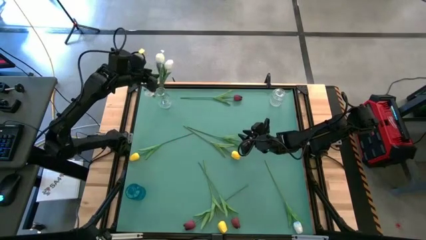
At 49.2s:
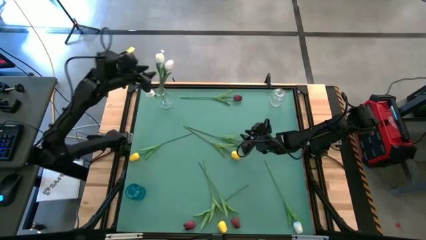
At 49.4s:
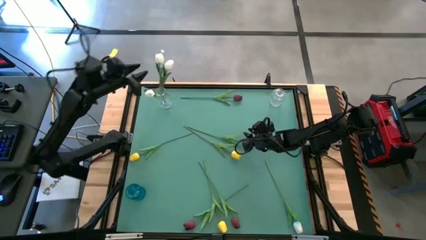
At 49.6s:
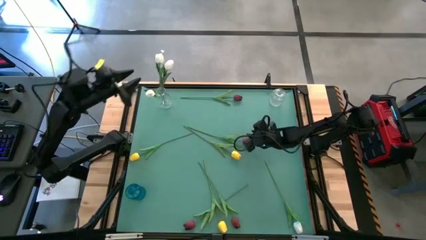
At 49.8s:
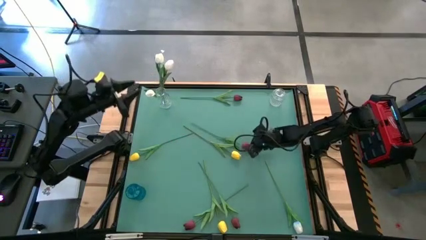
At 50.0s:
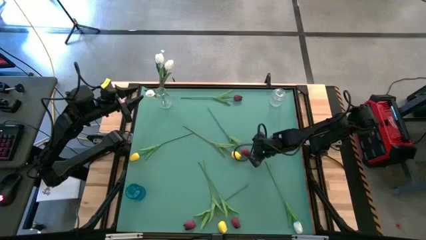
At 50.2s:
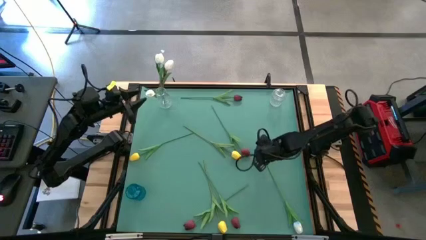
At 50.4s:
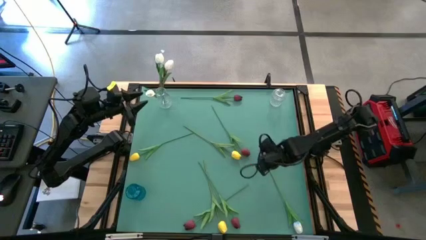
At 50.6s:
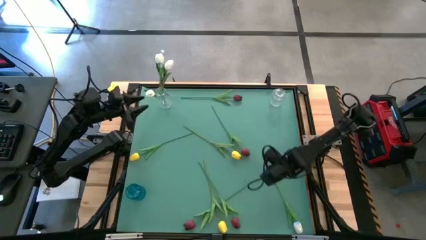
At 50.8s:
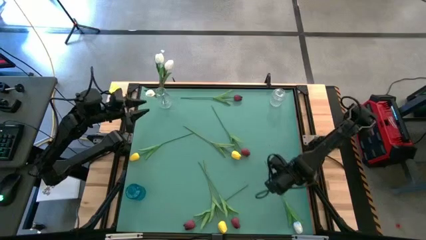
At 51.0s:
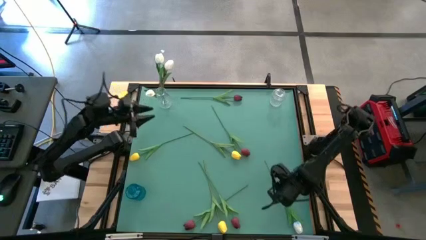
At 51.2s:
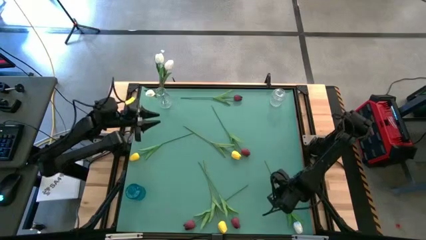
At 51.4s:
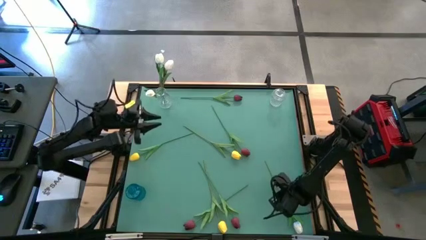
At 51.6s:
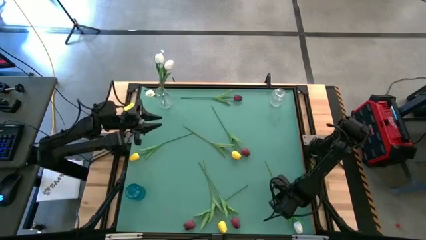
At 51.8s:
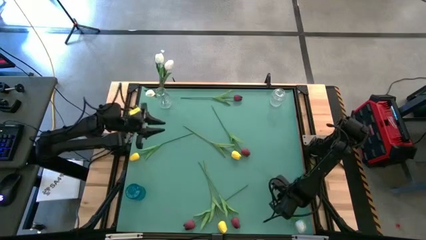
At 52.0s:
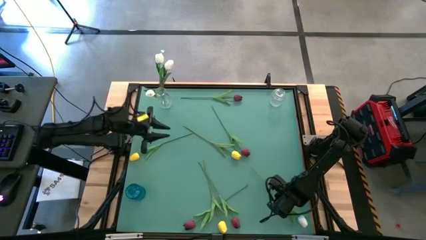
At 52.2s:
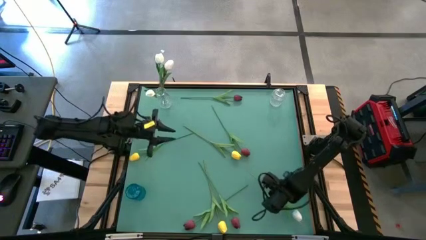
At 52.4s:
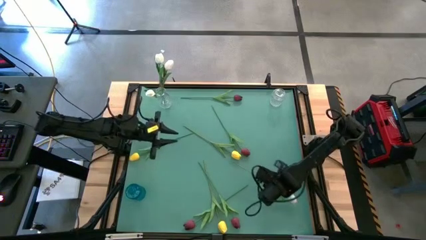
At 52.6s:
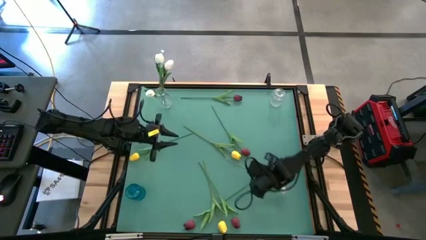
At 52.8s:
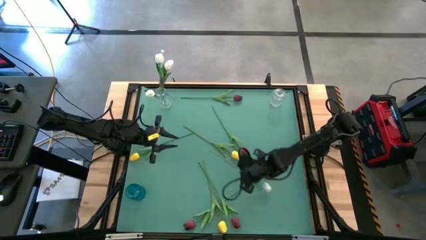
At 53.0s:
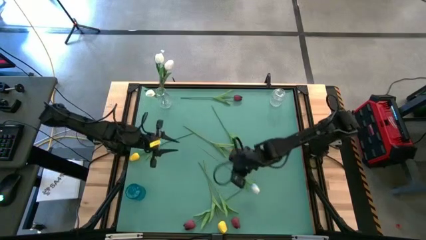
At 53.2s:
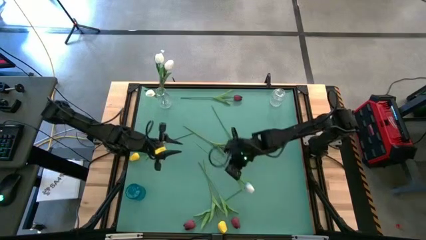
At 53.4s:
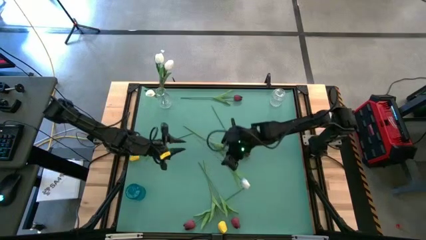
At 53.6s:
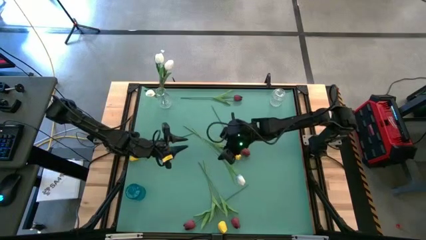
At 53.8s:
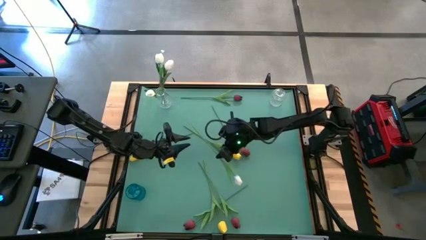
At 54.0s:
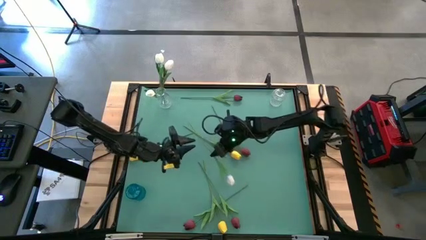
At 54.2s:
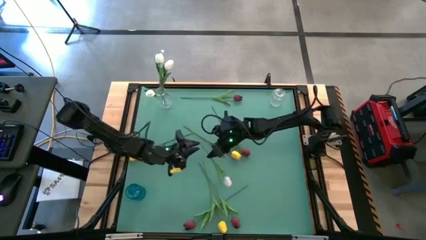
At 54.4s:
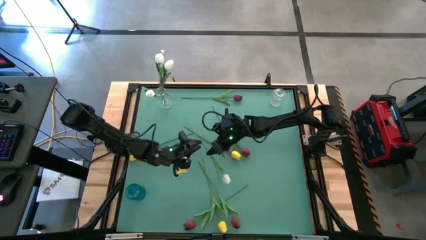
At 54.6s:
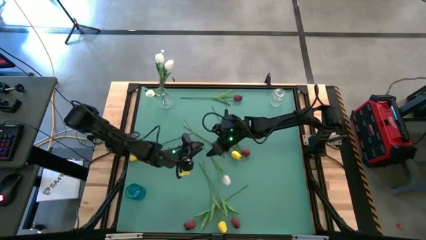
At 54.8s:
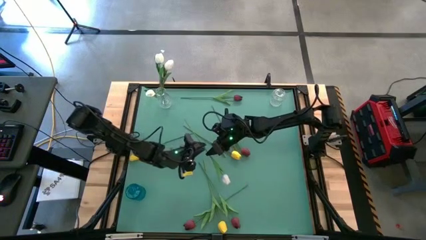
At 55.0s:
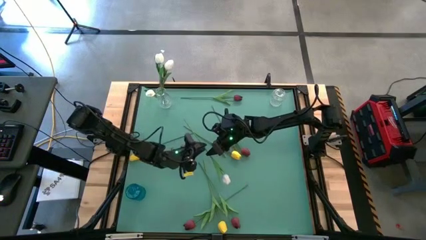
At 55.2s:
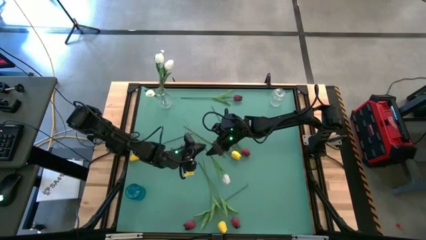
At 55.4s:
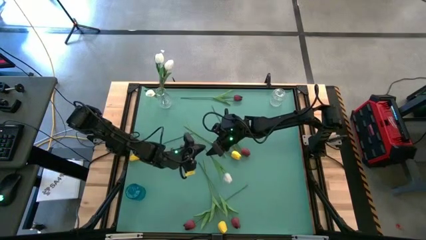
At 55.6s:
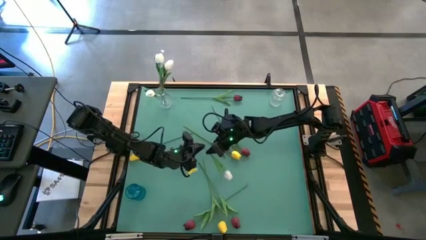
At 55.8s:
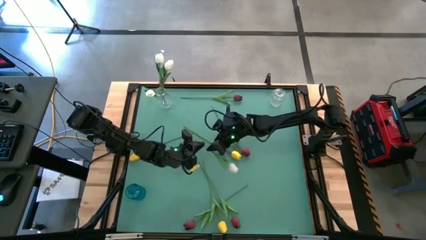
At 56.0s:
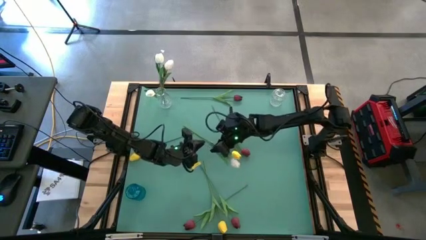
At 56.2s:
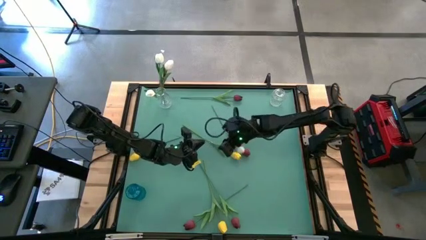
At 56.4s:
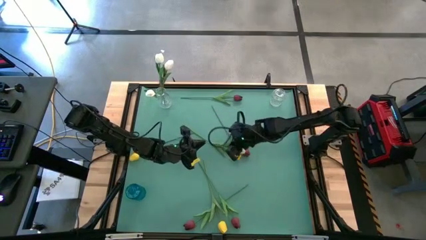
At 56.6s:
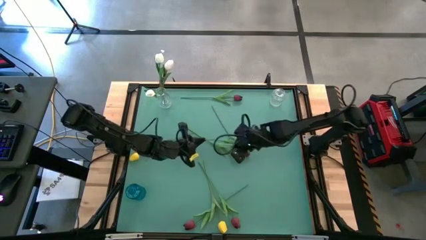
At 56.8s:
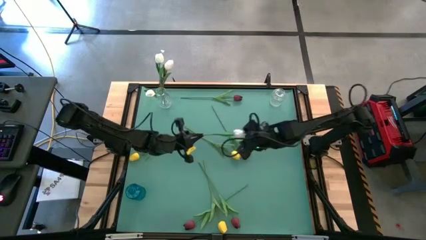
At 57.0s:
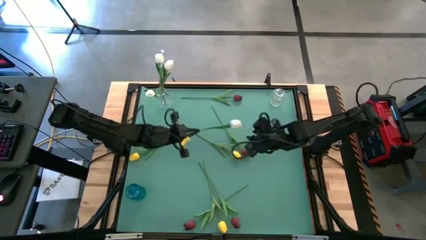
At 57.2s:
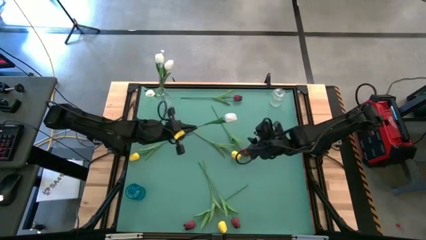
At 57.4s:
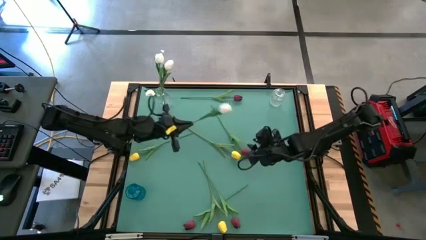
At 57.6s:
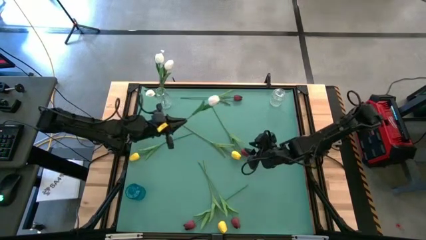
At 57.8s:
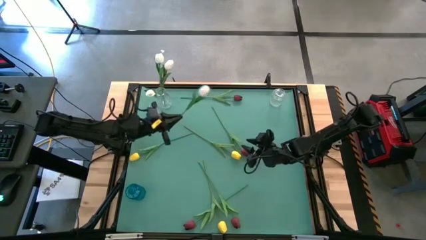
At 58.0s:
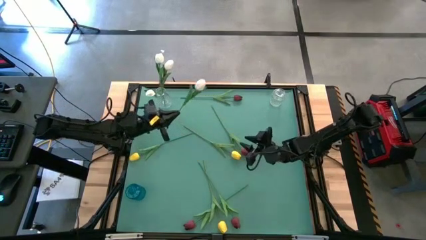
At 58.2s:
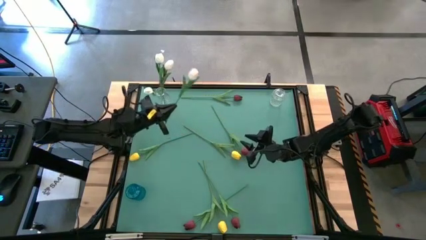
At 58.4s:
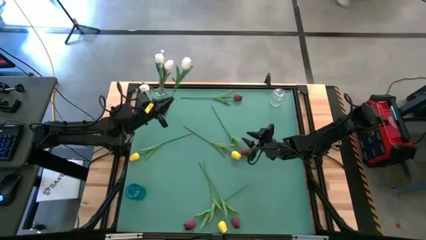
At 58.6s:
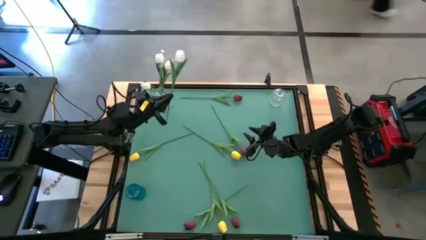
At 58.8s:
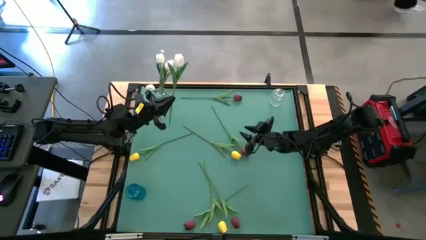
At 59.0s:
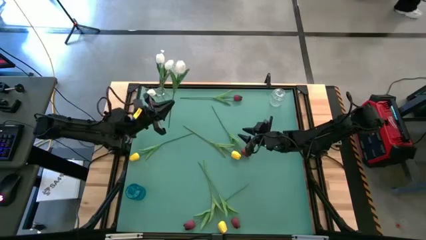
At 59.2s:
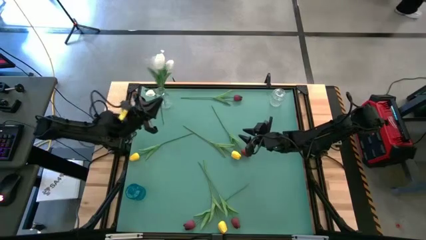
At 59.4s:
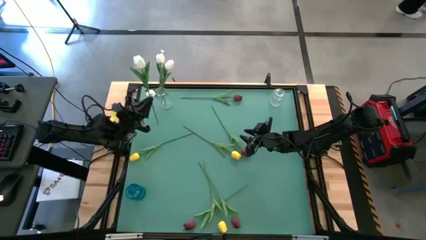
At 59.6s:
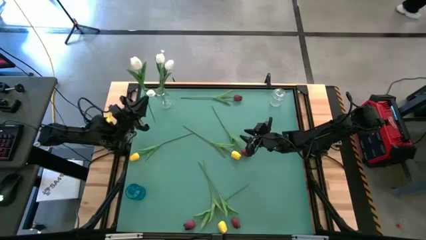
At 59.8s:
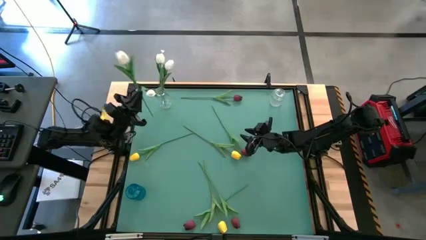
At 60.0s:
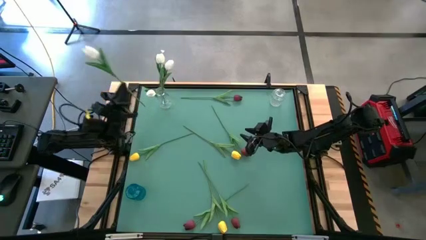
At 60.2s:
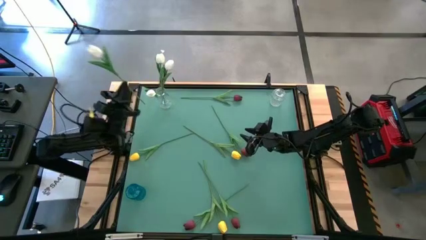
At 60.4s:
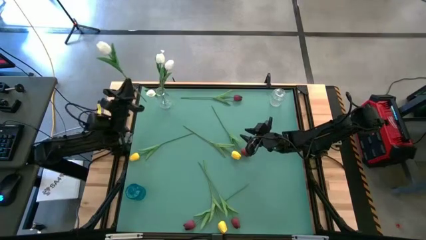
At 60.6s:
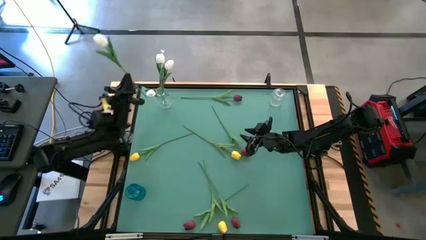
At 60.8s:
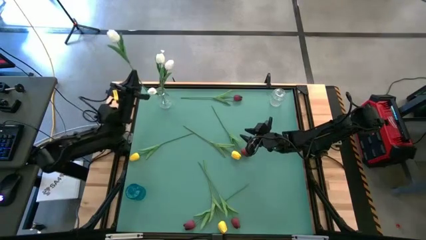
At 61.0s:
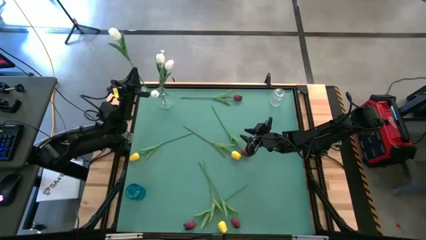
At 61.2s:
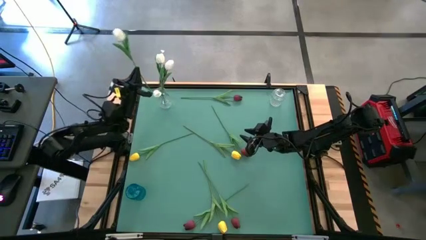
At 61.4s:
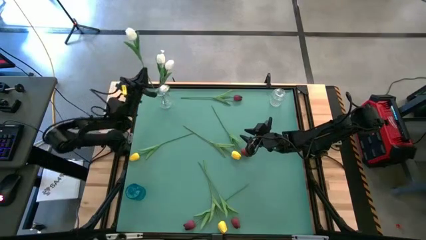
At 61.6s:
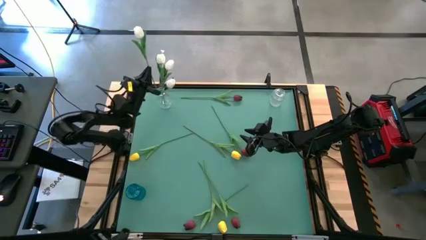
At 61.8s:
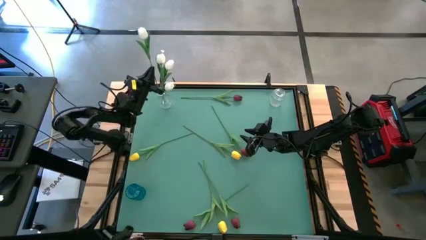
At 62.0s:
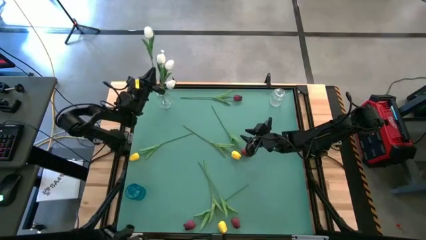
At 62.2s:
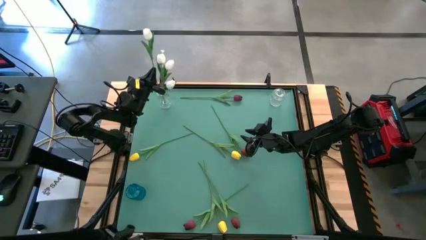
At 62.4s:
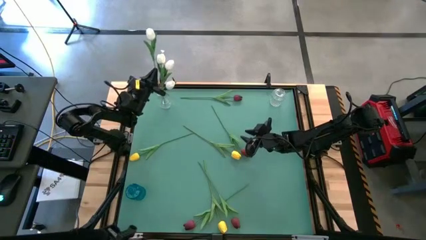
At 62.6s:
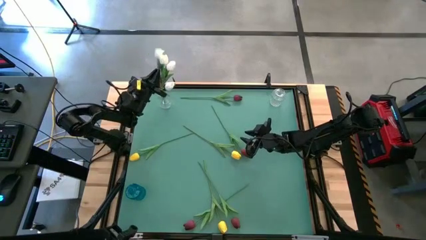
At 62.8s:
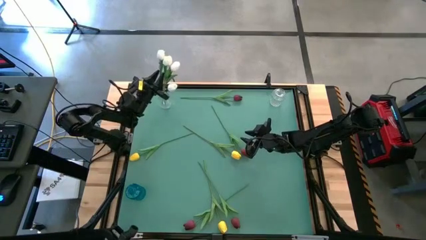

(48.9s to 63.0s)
Task: Sort flowers into vase by color
Put the white flower into the left transparent vase

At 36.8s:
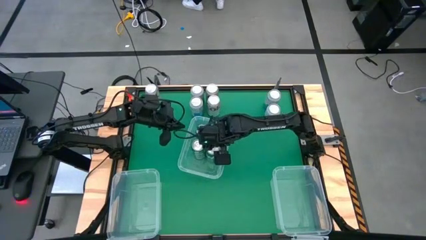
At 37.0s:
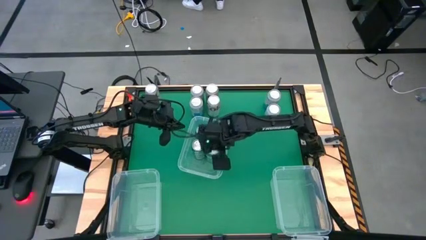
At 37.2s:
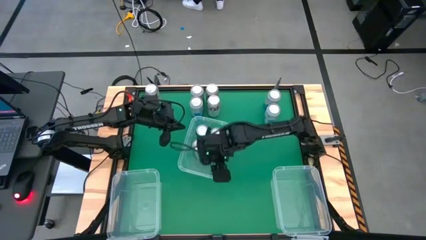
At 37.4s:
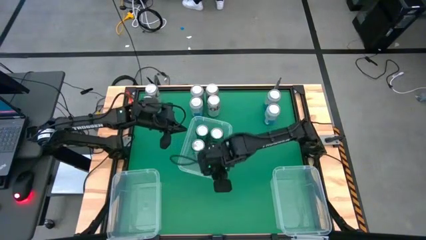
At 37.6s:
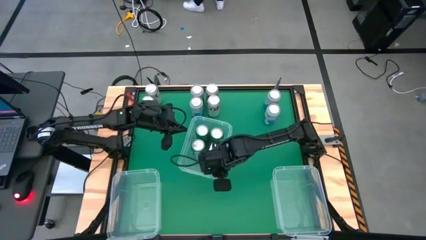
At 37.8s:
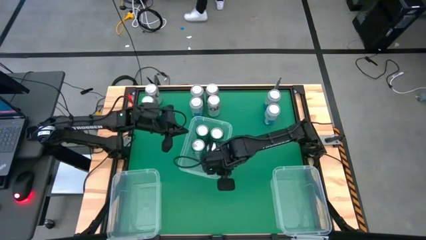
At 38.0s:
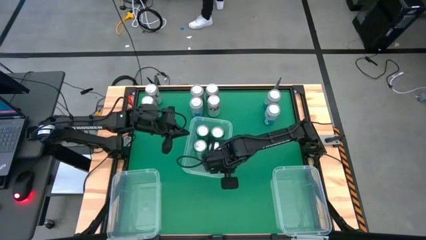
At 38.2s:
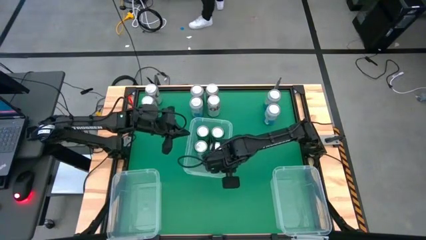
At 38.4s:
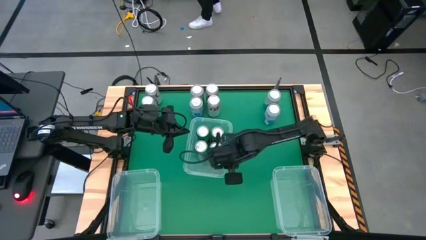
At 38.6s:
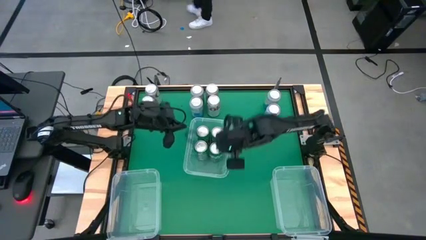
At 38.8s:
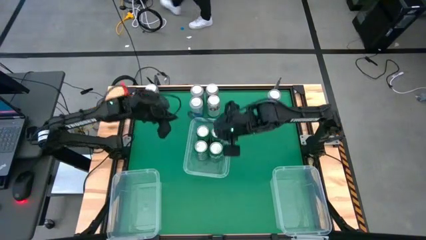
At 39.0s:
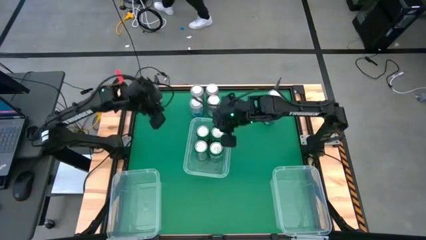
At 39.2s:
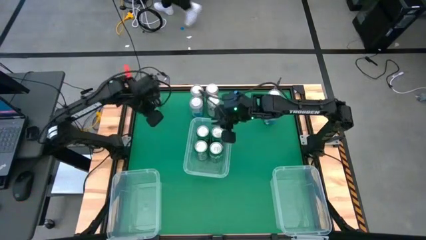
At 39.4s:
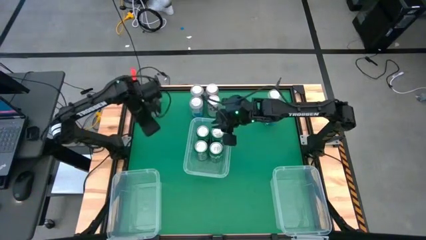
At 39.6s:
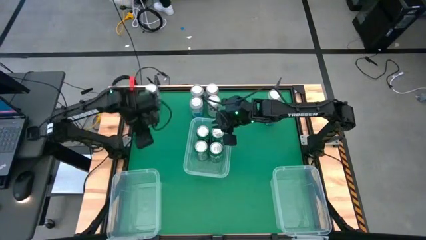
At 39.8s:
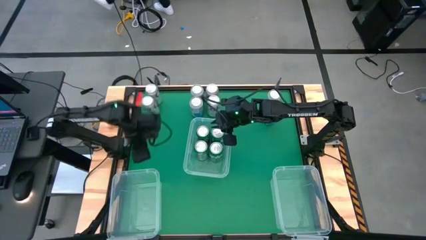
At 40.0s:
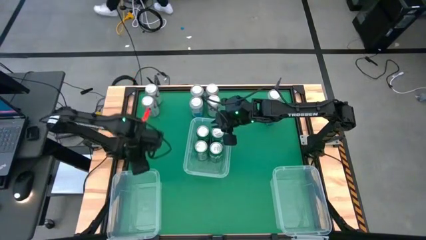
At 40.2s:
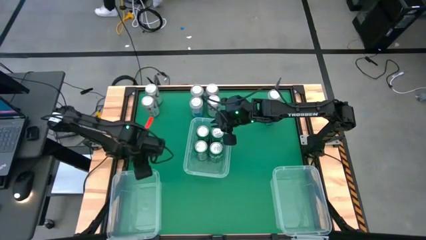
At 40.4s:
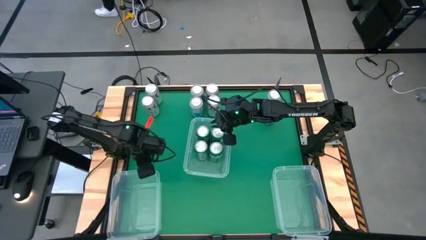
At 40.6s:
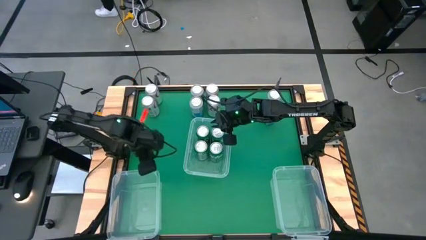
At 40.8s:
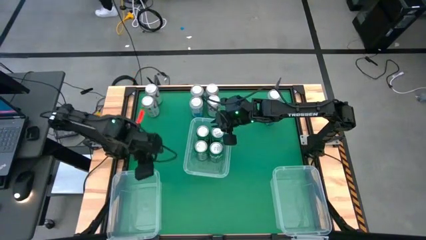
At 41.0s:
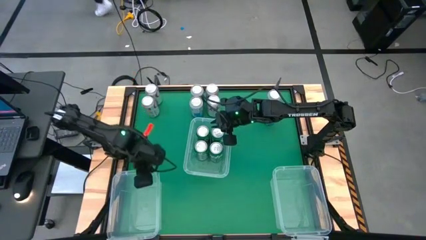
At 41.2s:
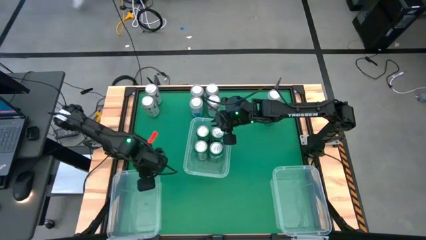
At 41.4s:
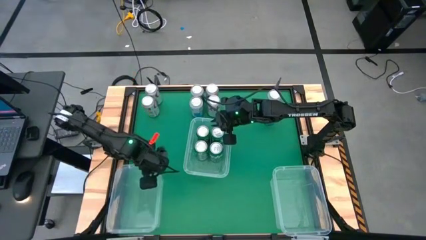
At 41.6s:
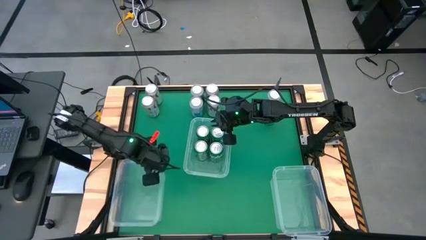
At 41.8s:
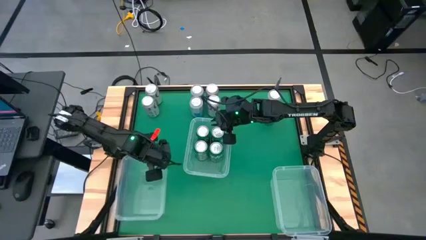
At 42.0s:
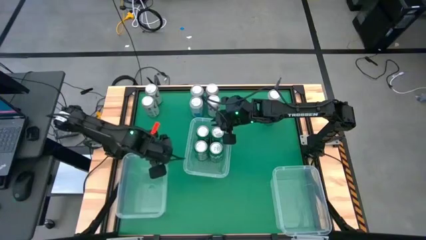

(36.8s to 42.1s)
Task: Sort soda cans
Adjust the bins on the table
